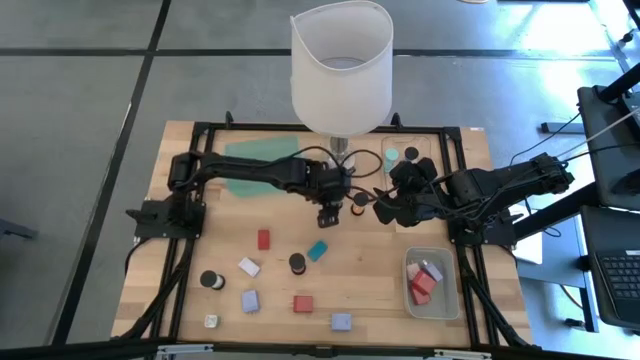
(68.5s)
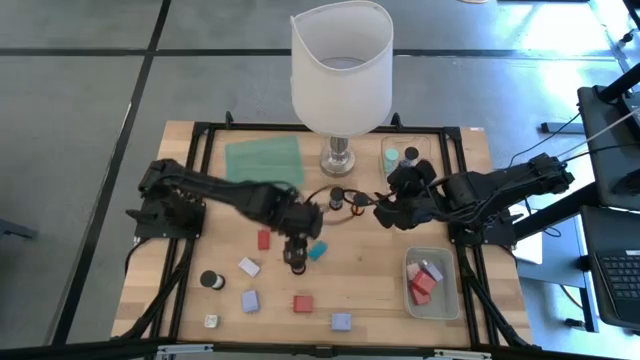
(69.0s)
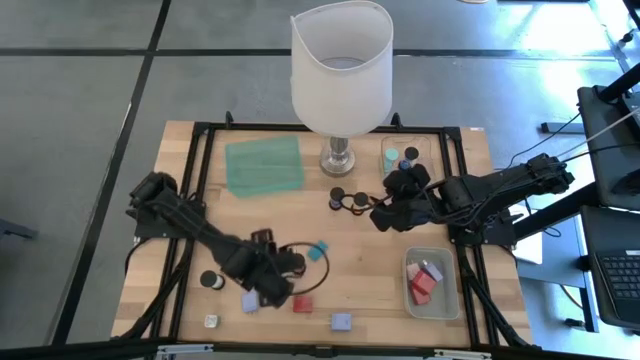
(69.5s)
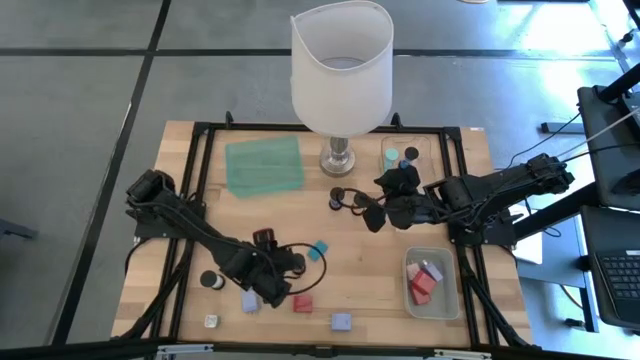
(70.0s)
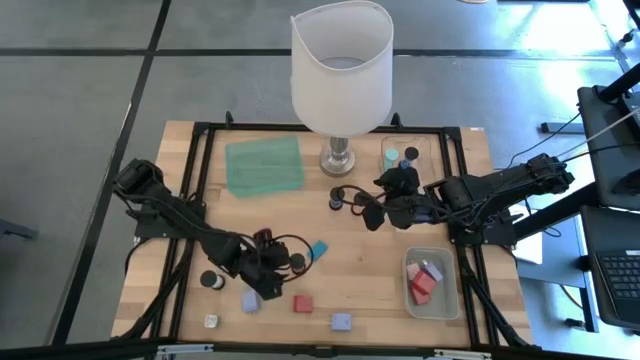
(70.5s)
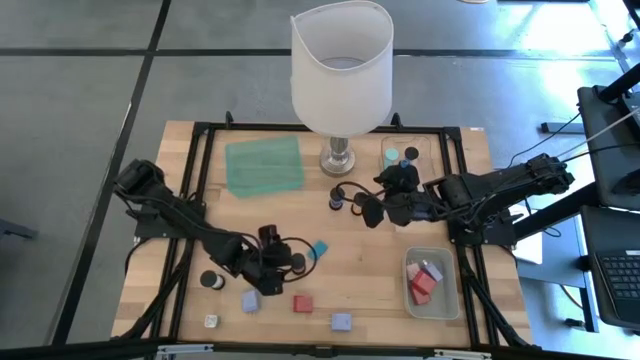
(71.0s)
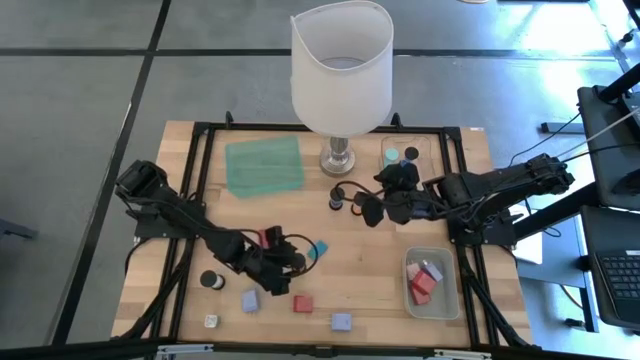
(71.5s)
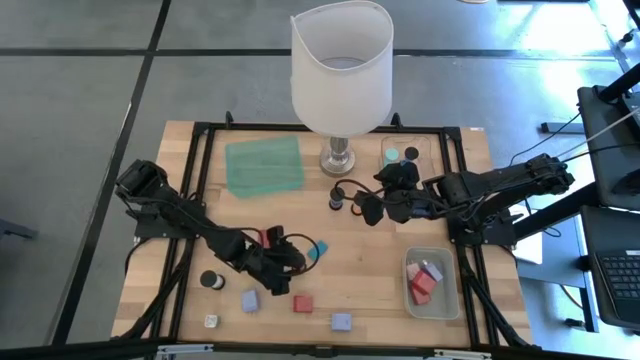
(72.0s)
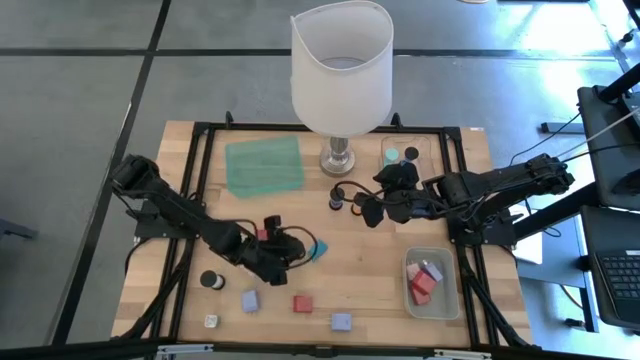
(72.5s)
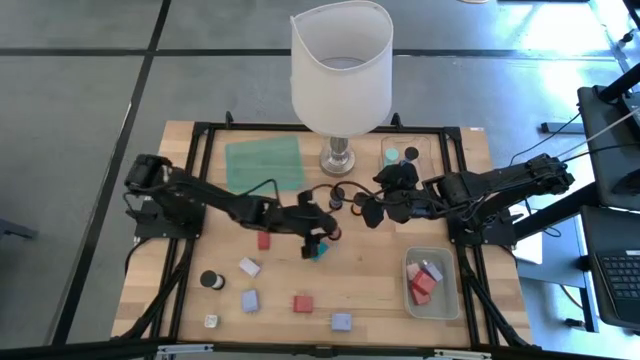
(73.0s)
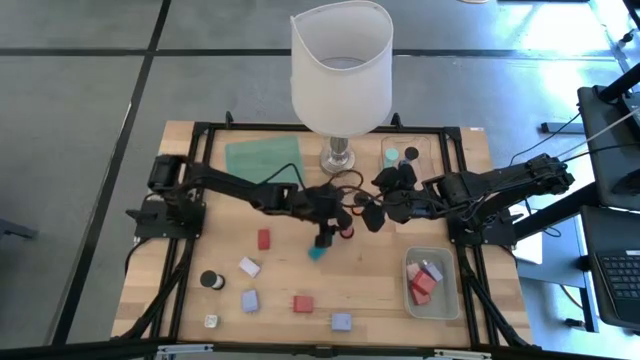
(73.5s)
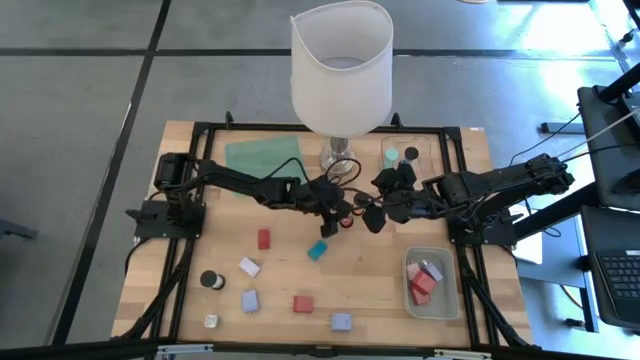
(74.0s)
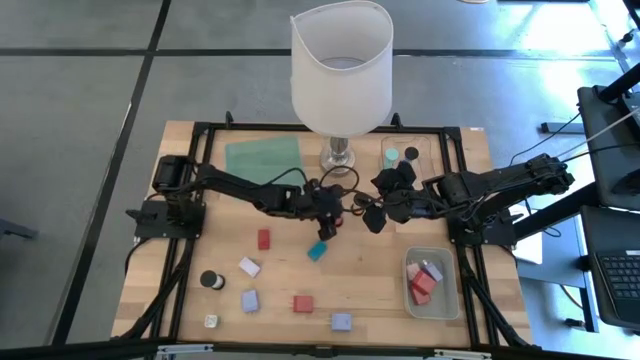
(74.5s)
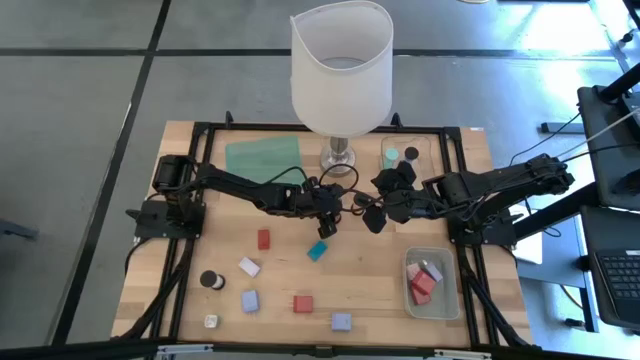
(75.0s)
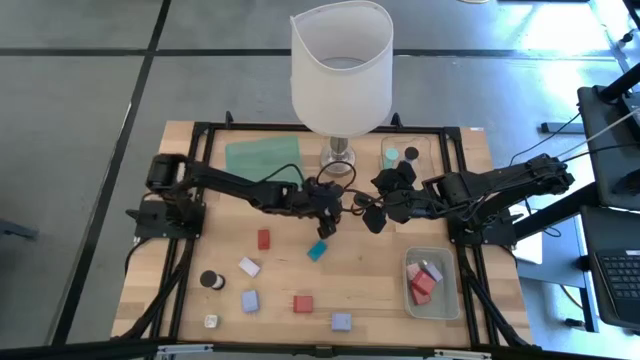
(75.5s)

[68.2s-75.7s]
Task: Pick & Place Office items
Move the red hourglass to the center of the table

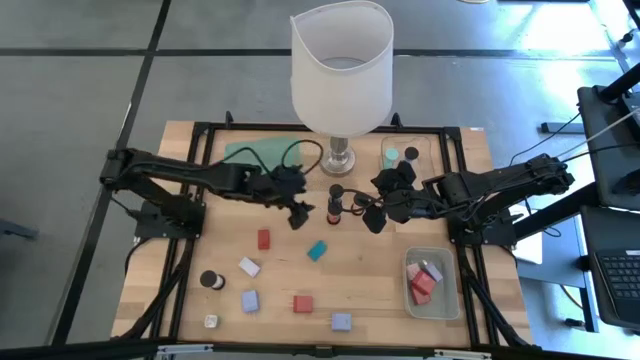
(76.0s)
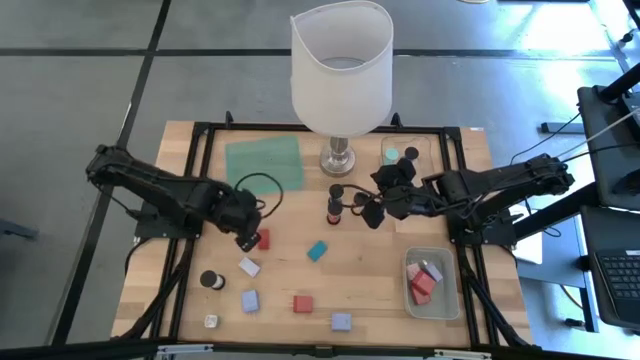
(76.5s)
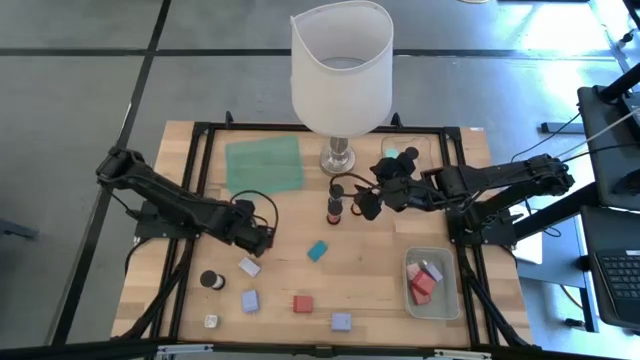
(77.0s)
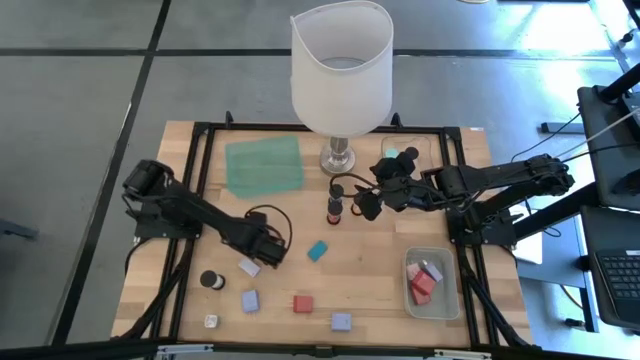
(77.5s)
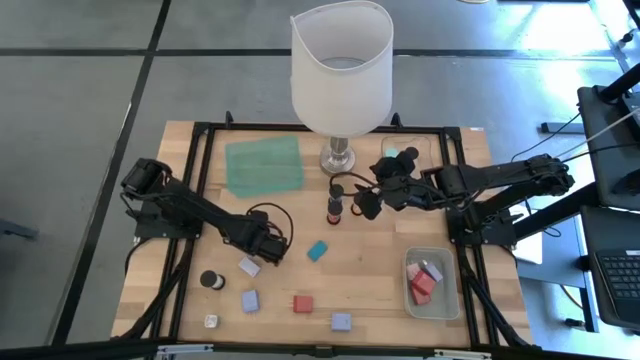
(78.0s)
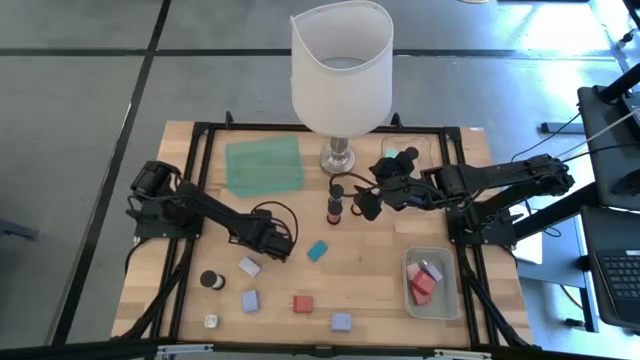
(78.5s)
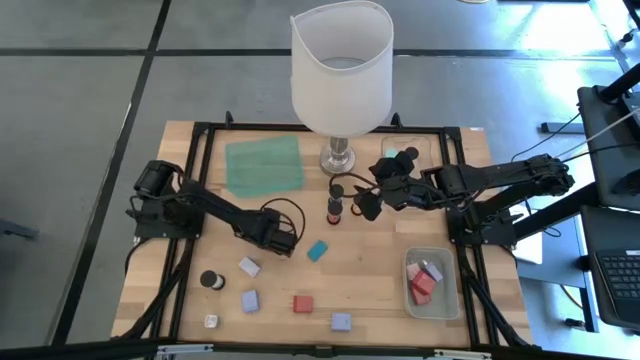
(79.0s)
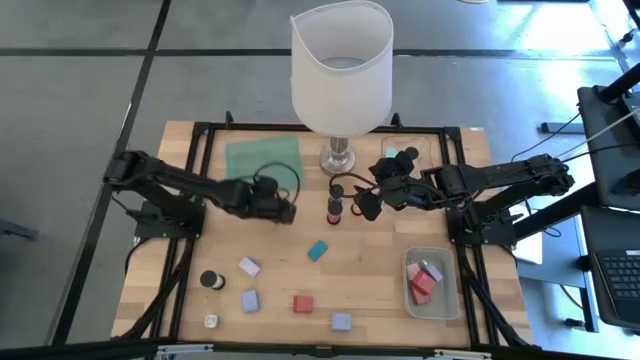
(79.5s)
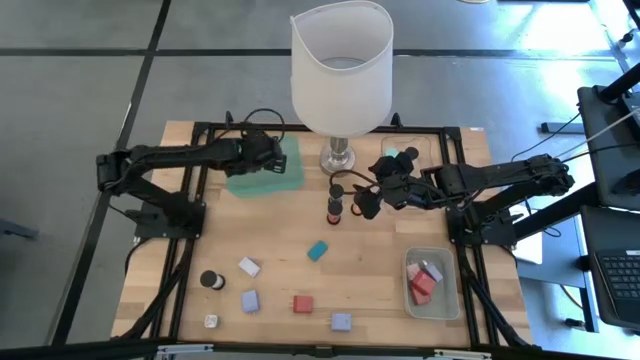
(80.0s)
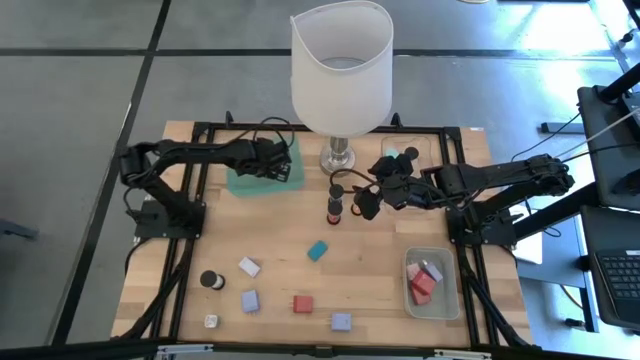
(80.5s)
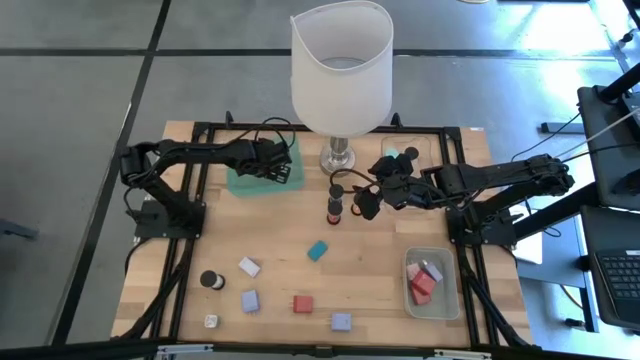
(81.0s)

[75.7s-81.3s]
Put the red digital timer into the blue bin

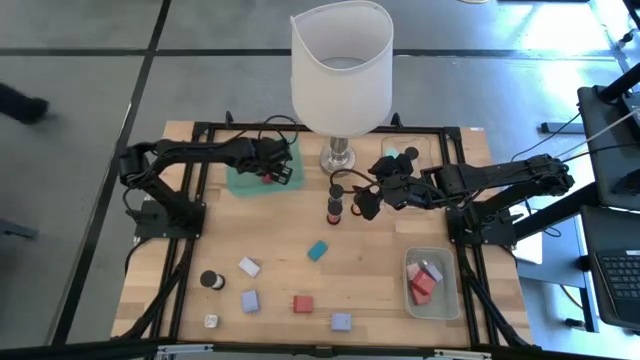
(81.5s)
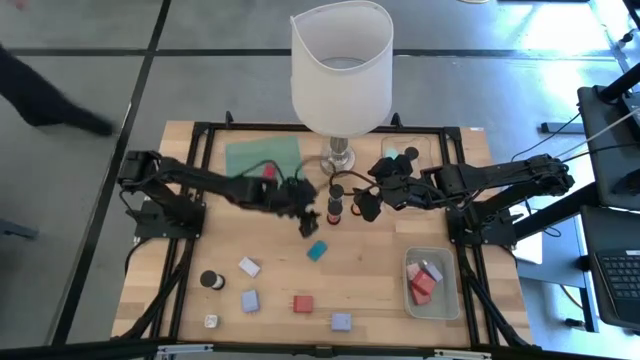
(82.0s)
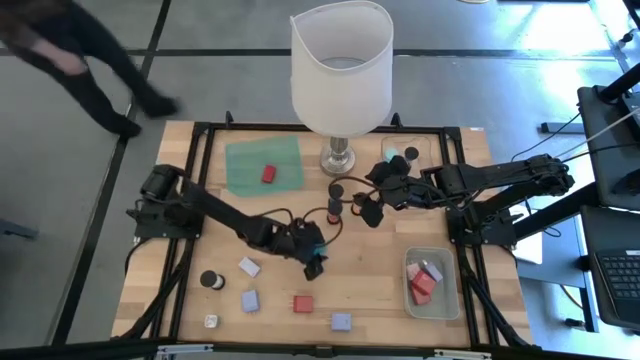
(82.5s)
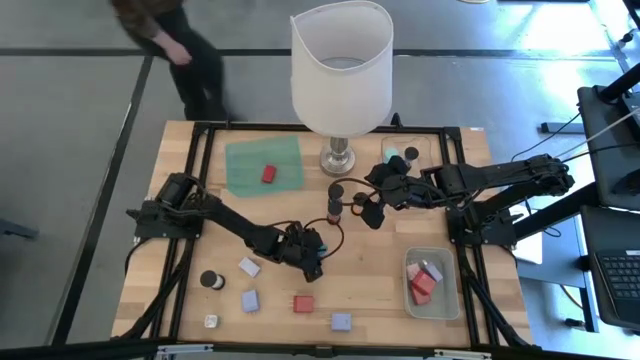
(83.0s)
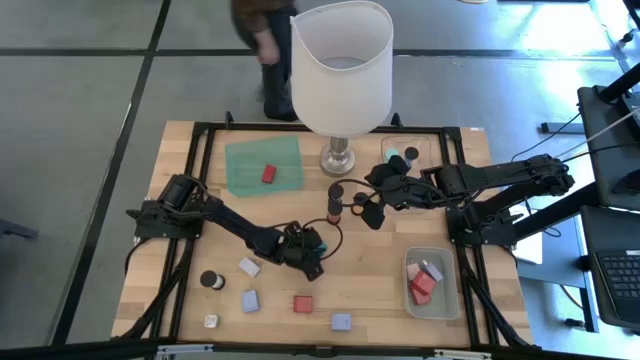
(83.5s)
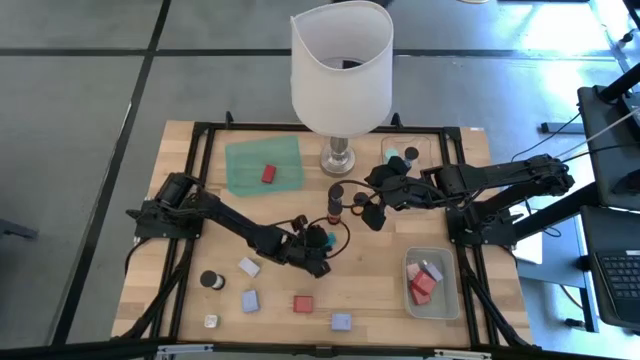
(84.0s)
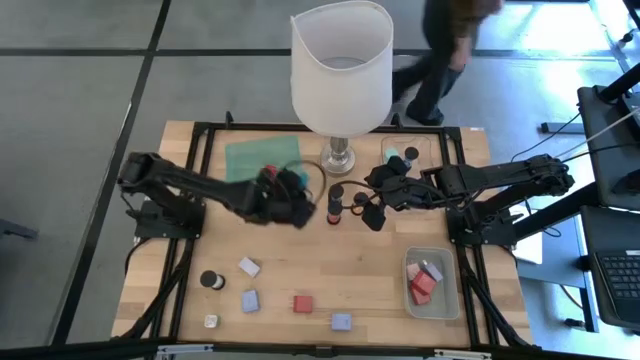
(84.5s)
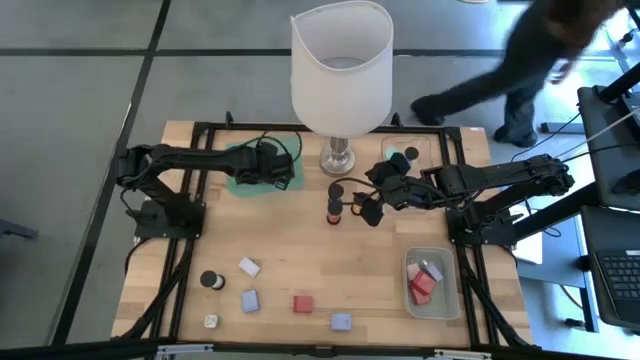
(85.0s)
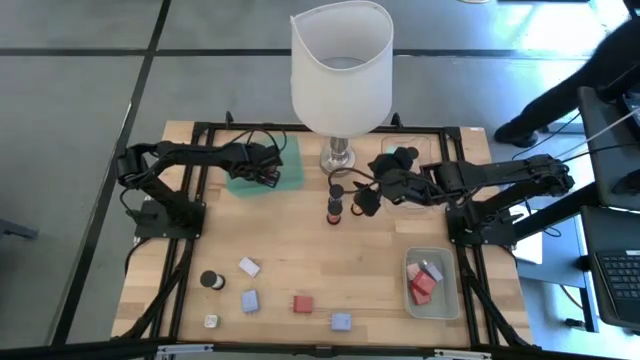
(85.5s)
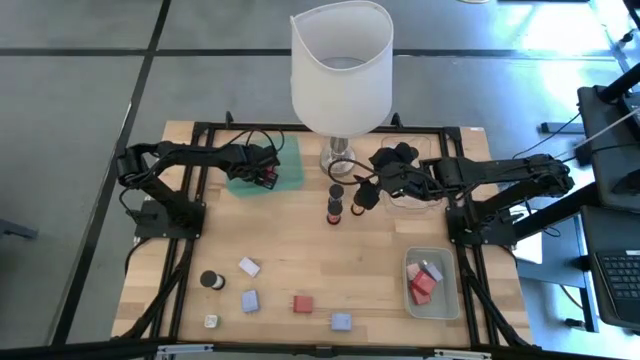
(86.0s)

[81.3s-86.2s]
Put the blue digital timer into the blue bin

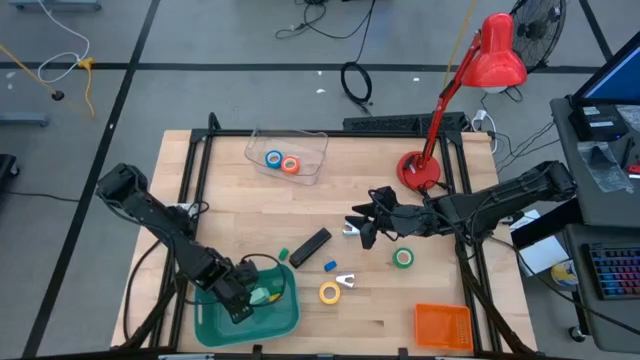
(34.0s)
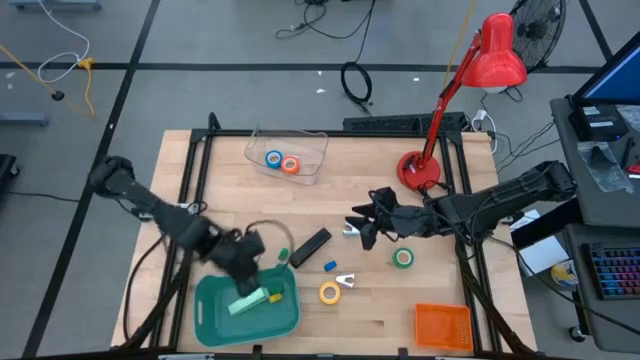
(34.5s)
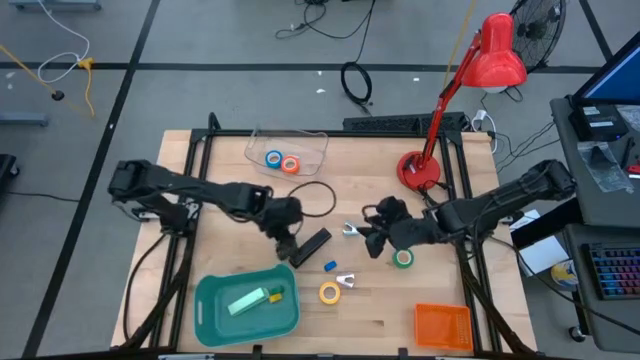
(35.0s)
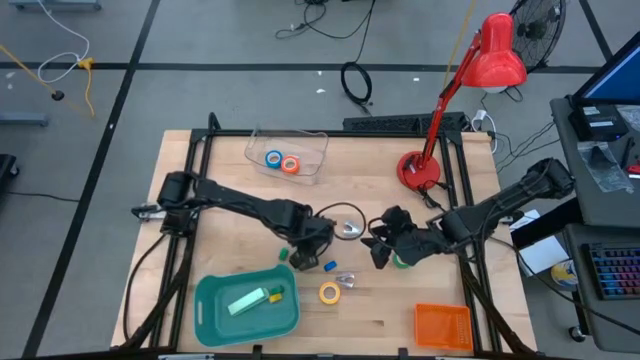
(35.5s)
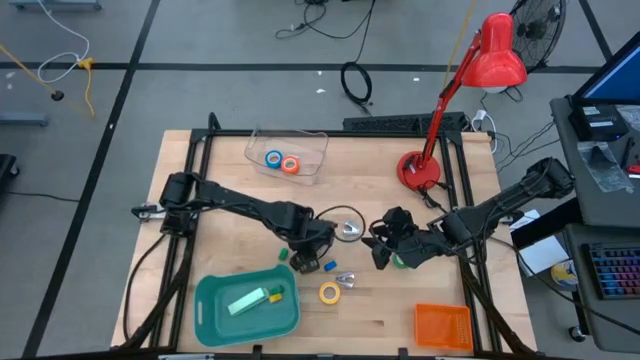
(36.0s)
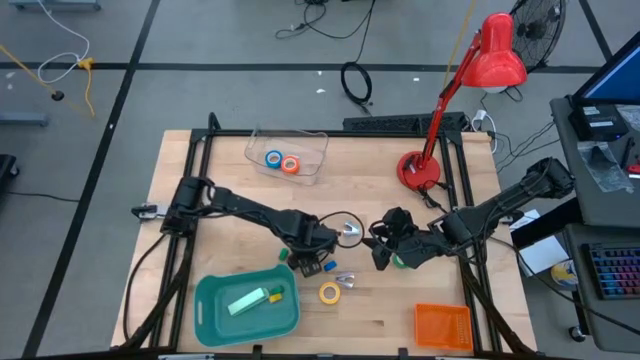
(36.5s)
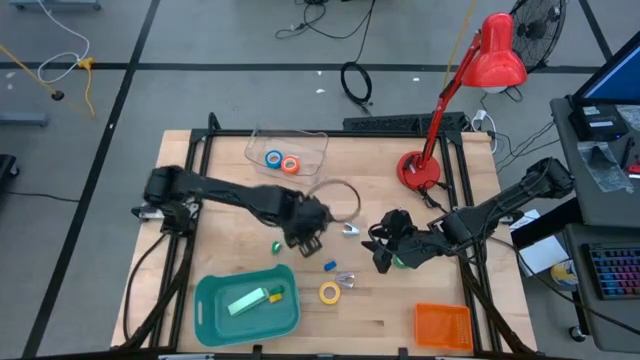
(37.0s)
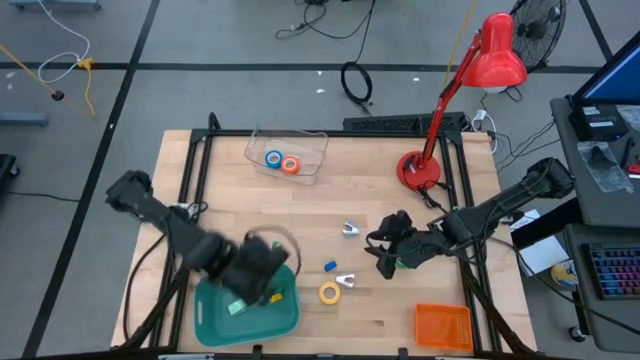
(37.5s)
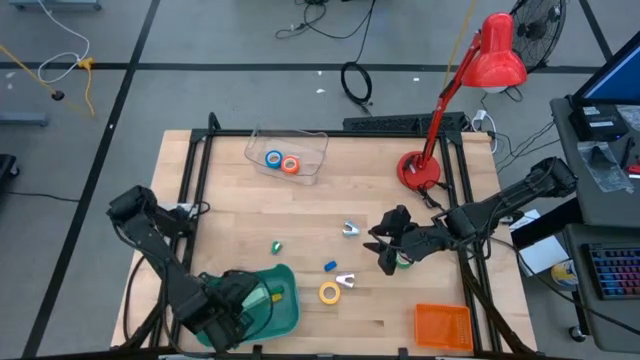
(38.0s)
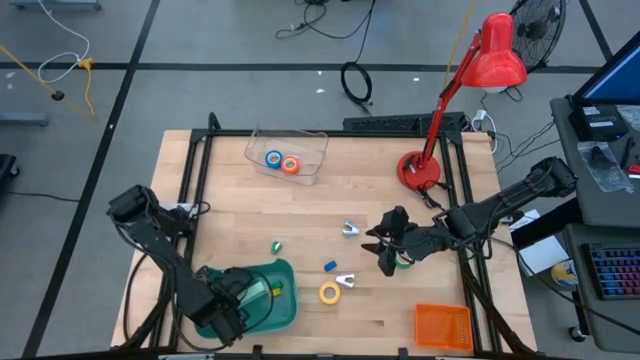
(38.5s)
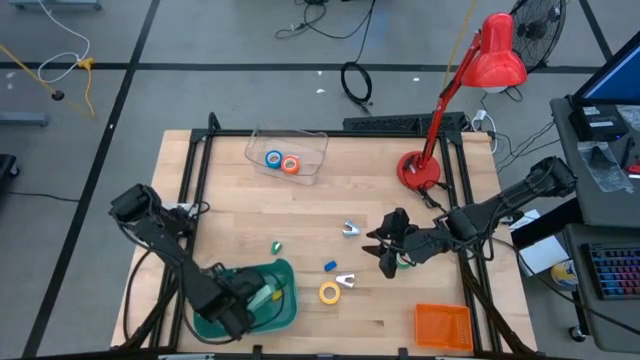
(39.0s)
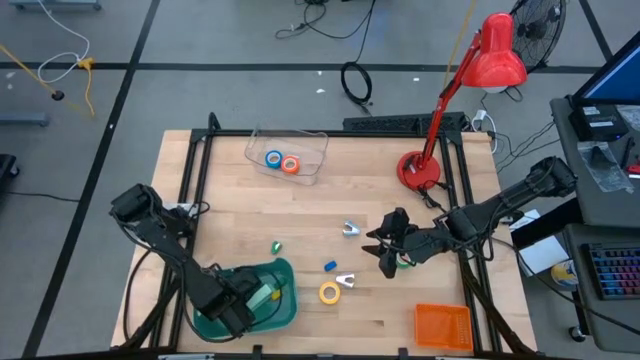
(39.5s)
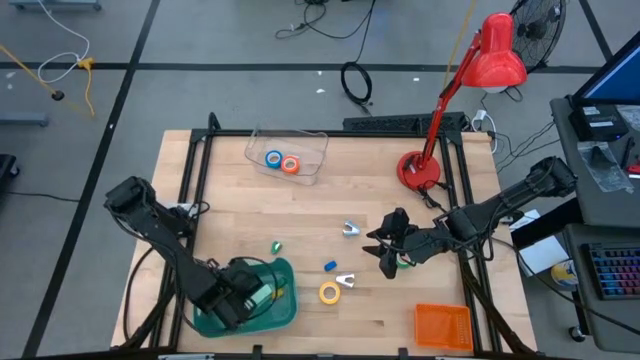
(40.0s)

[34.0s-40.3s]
Task: Pick and place Stapler, Stapler remover, tape
Put the large black stapler into the green bin
